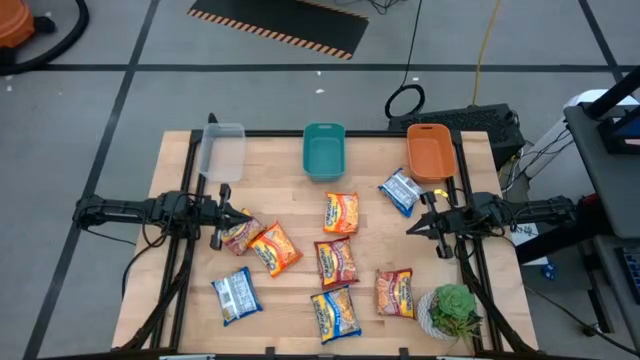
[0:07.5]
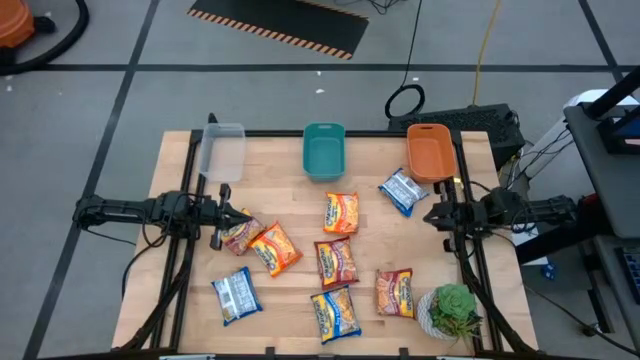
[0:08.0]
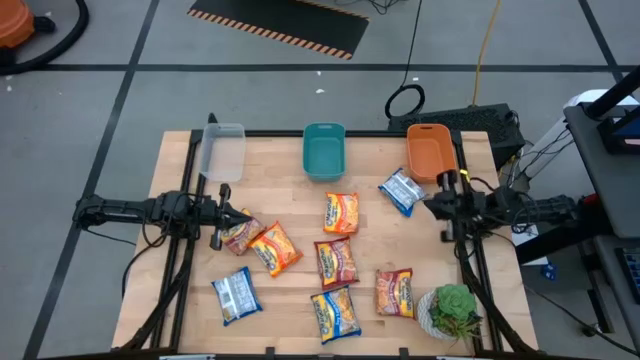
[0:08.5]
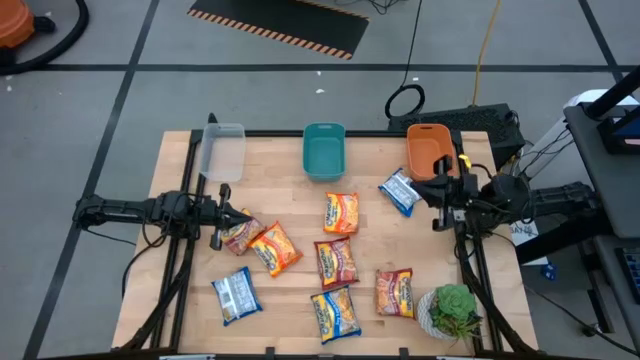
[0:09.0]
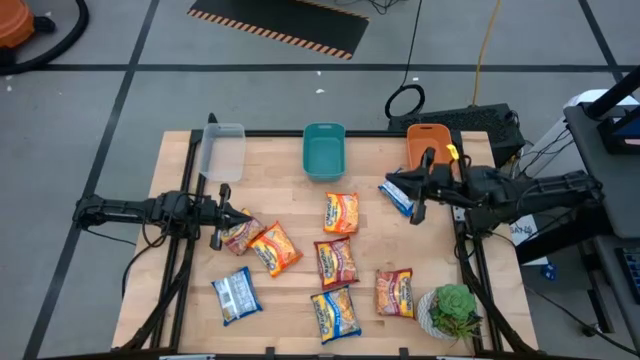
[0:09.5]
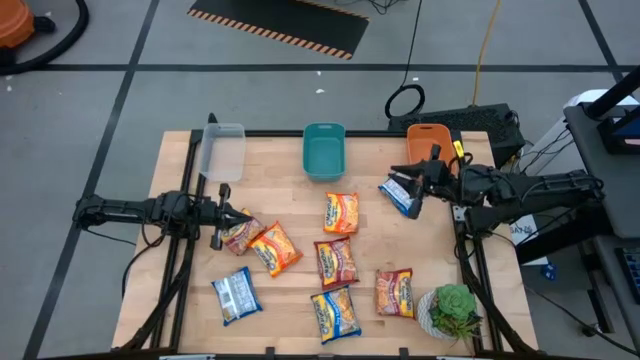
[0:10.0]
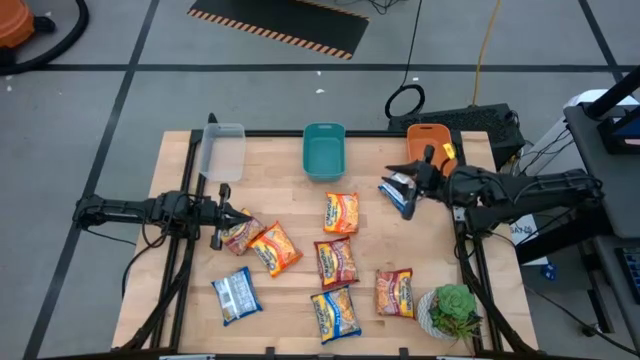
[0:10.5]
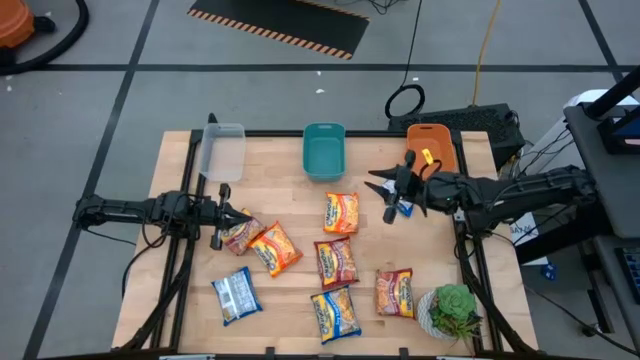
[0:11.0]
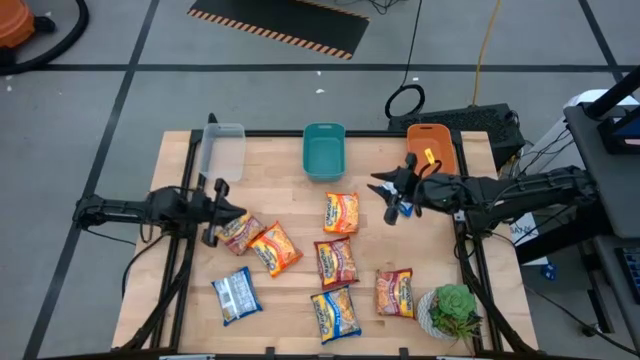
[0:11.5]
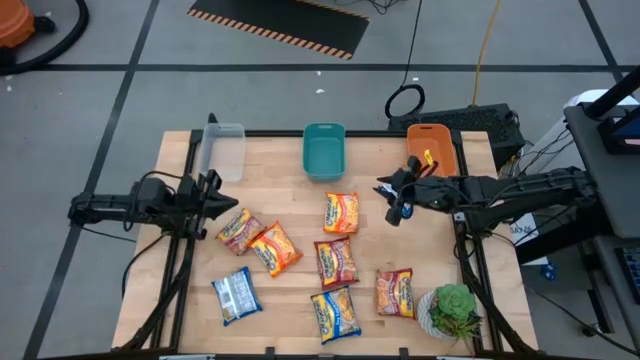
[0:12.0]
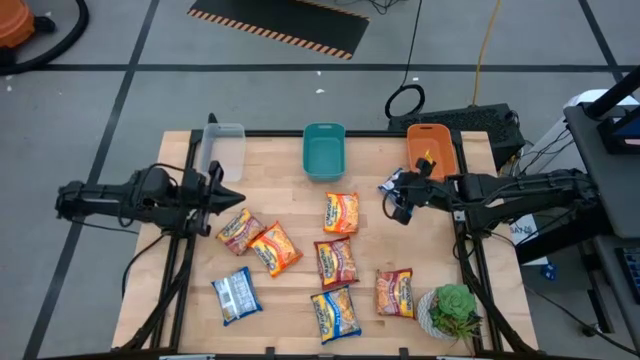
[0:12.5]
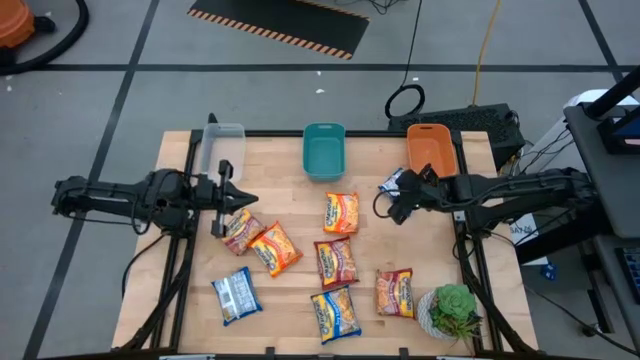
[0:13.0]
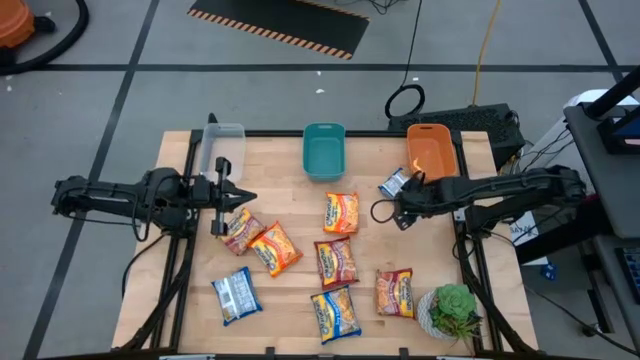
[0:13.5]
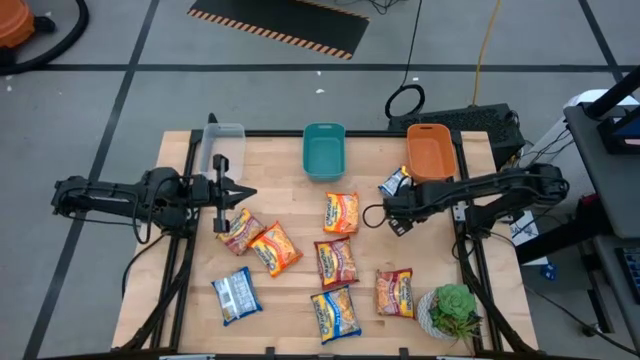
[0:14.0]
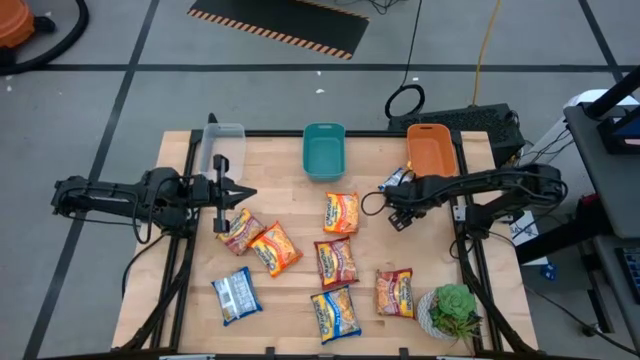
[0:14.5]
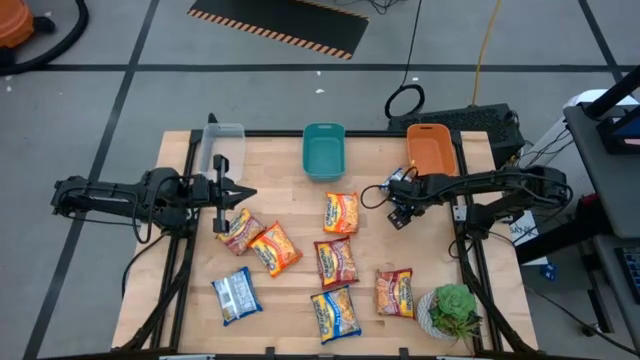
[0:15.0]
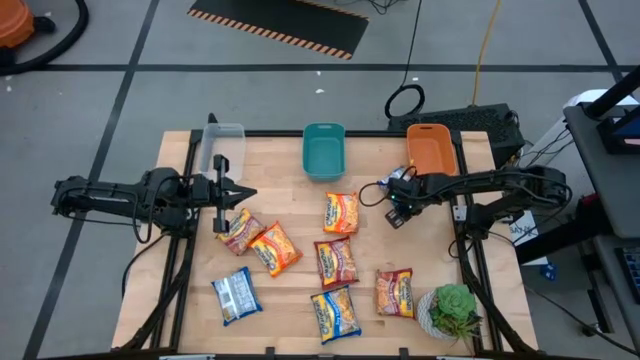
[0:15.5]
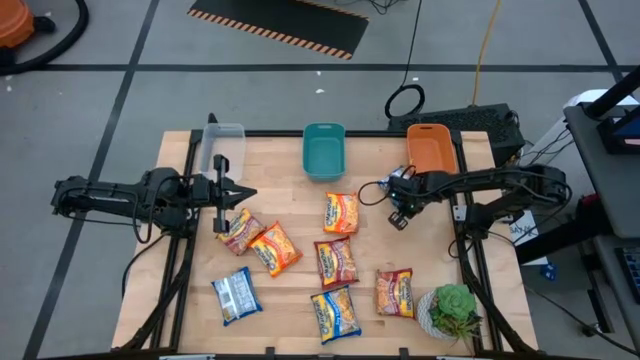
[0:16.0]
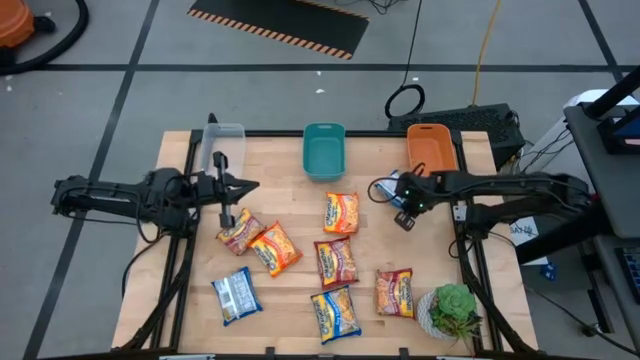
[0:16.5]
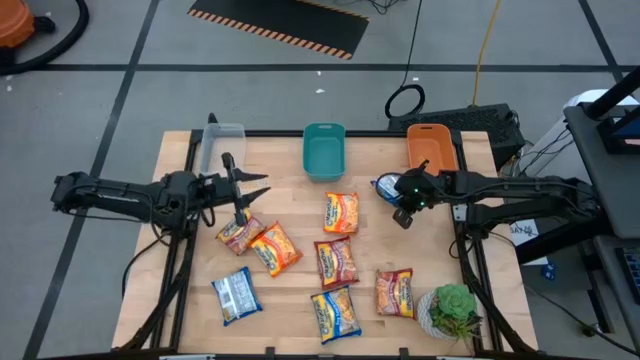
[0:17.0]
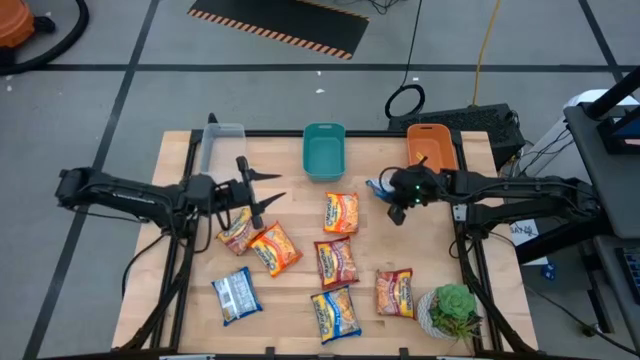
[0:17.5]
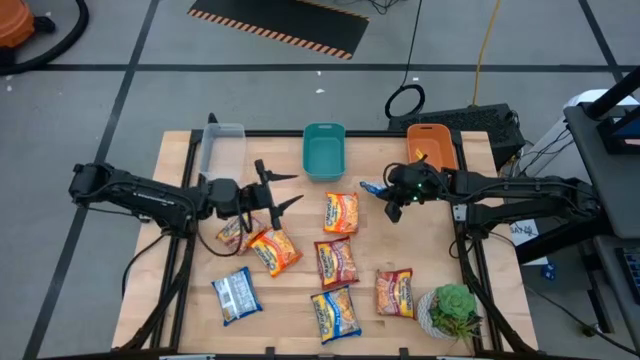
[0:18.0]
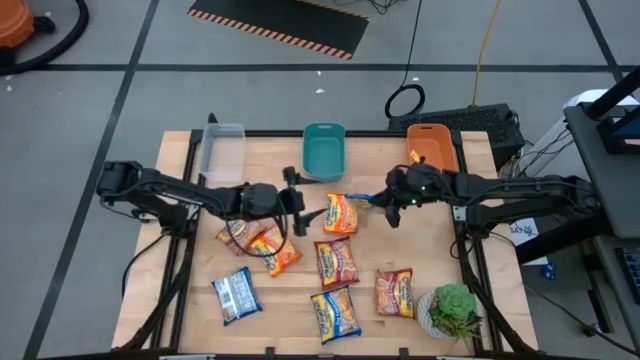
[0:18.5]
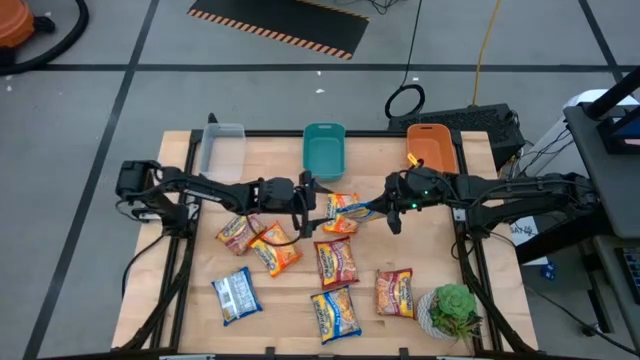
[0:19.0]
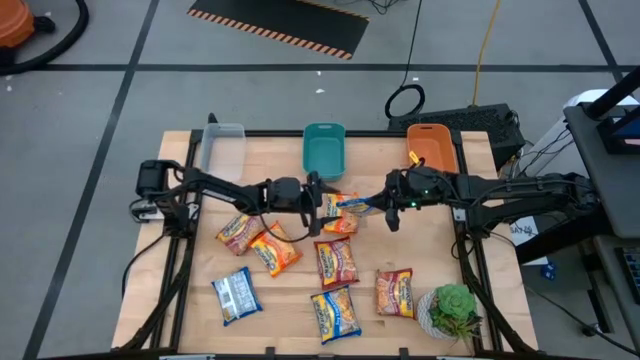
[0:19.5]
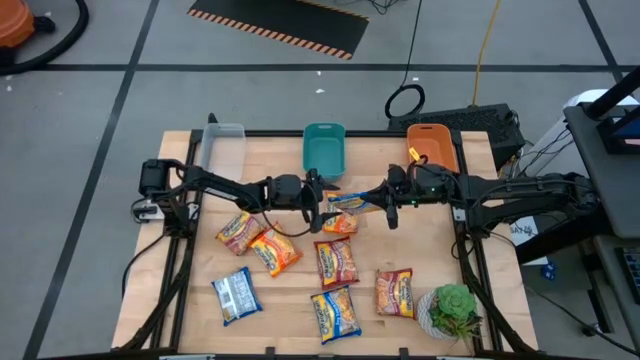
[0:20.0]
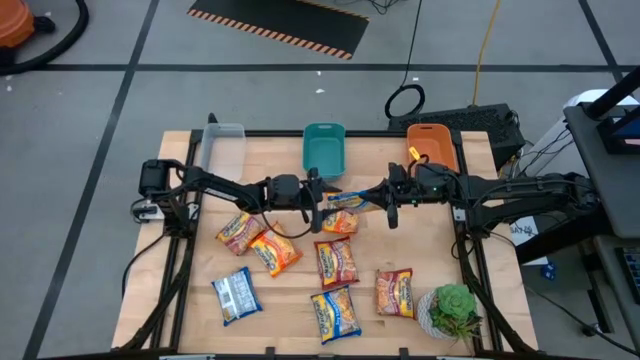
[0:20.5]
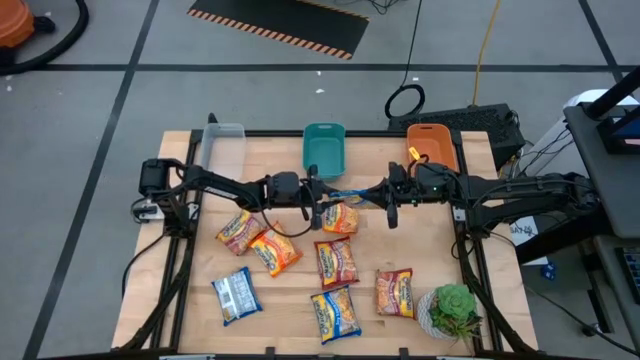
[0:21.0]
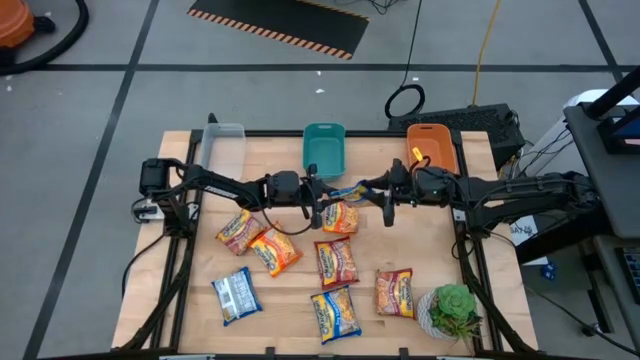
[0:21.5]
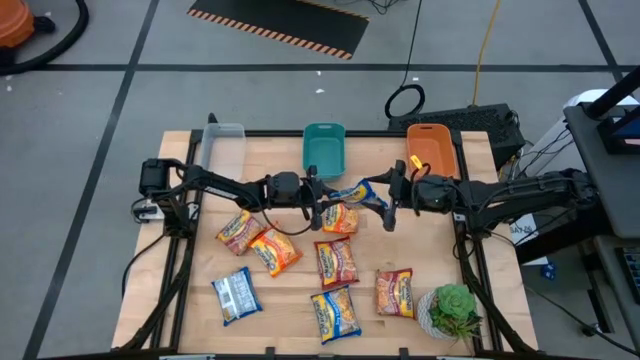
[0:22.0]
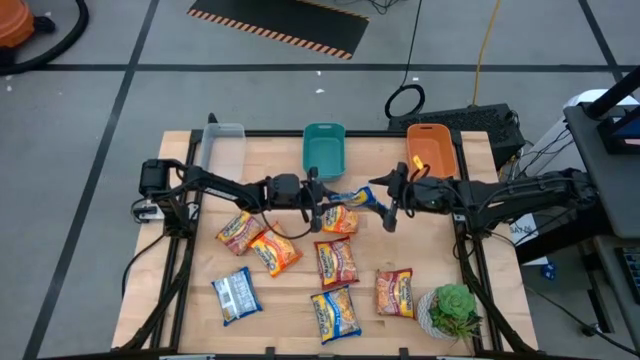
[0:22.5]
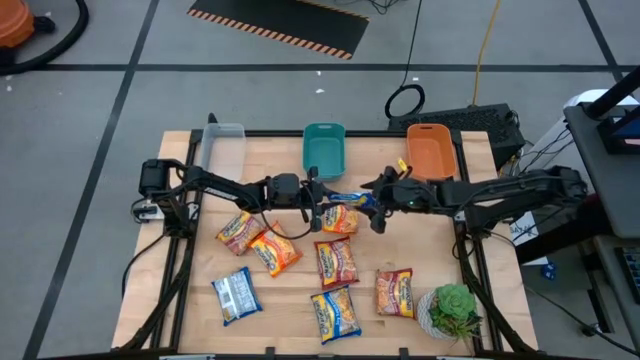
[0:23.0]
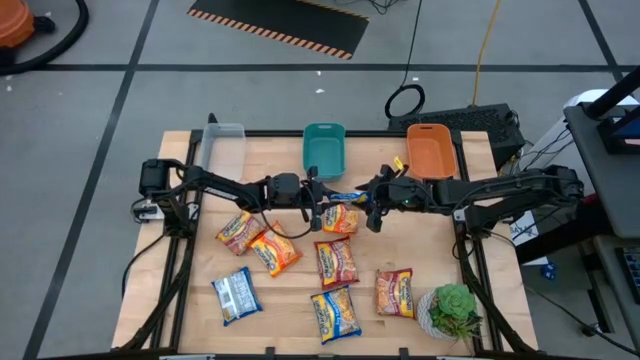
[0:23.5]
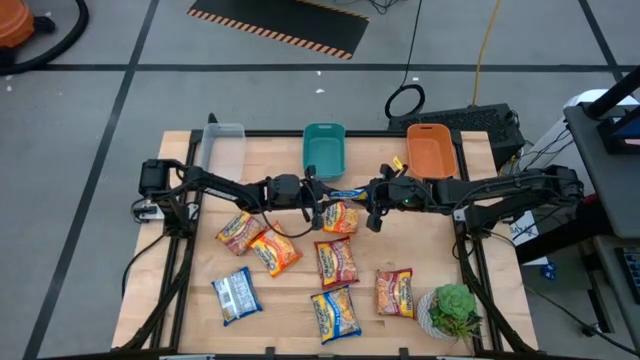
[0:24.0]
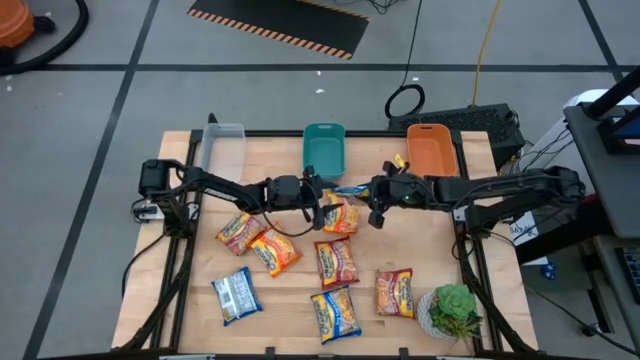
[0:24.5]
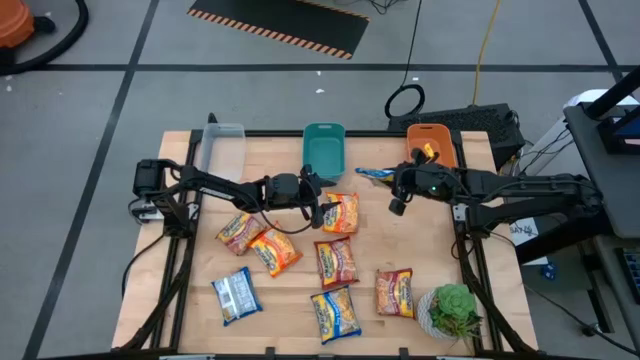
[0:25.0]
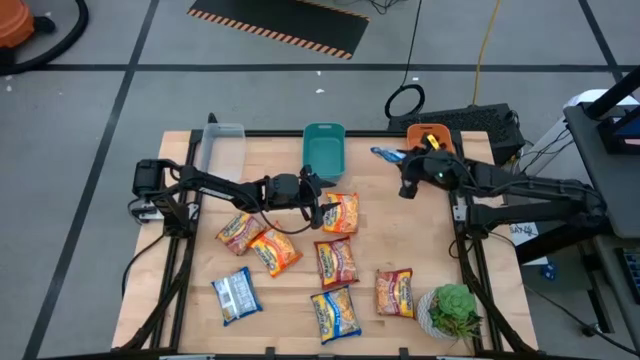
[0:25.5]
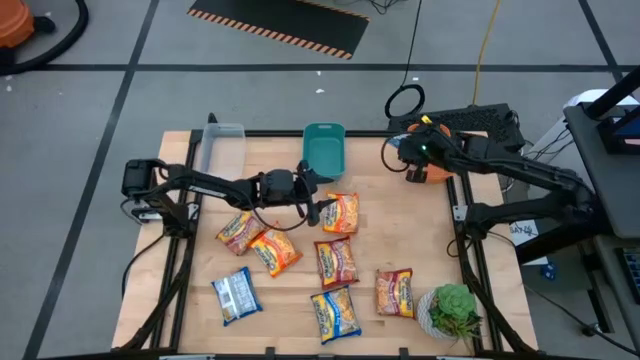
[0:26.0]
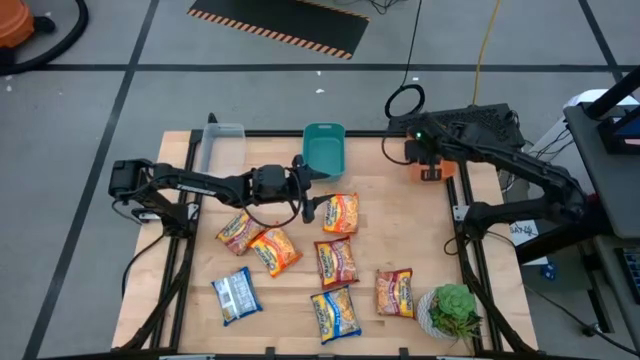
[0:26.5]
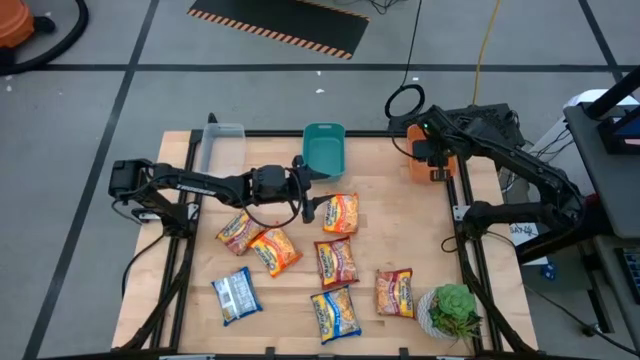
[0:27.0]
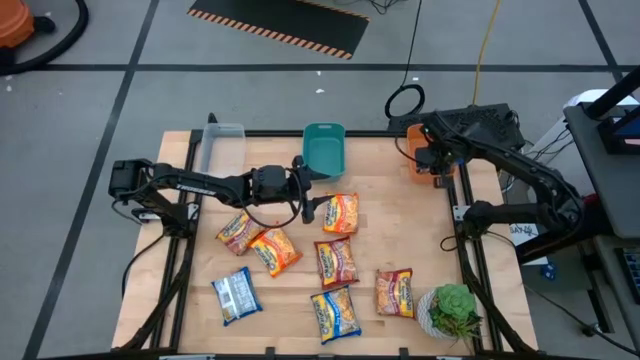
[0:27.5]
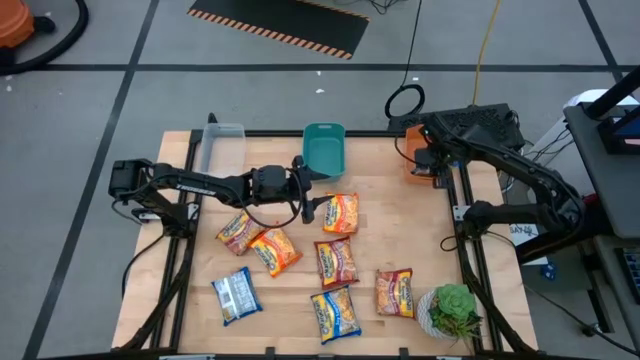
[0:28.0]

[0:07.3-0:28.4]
Task: Sort Maruchan noodles
Put the top blue noodle pack into the orange bin
